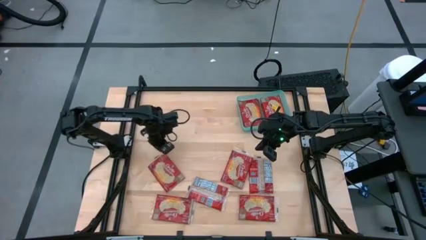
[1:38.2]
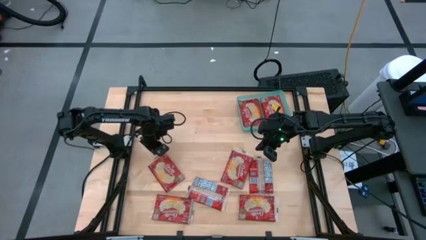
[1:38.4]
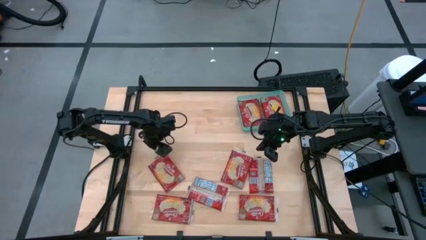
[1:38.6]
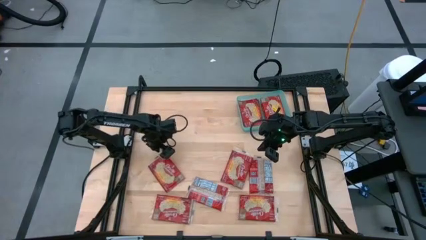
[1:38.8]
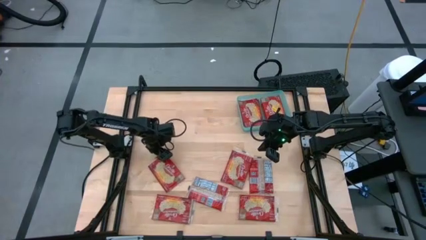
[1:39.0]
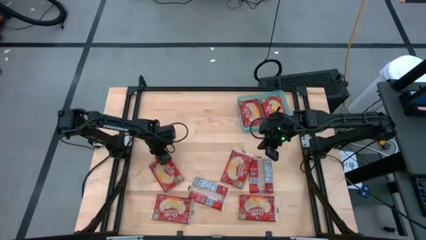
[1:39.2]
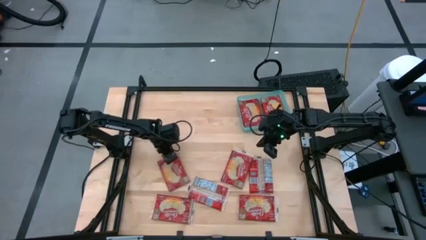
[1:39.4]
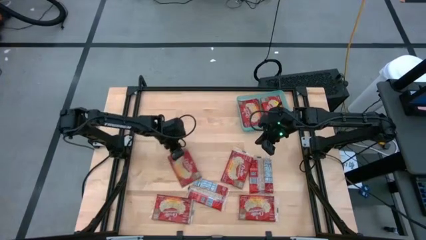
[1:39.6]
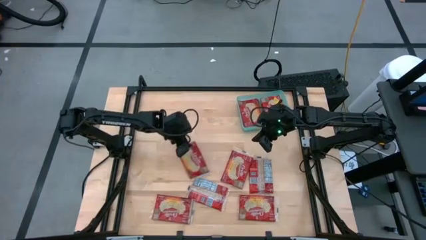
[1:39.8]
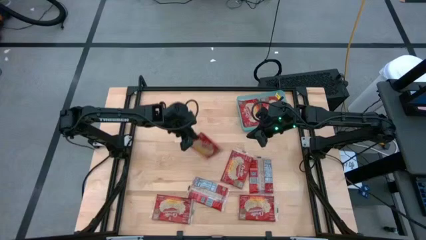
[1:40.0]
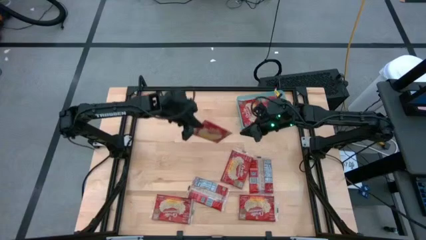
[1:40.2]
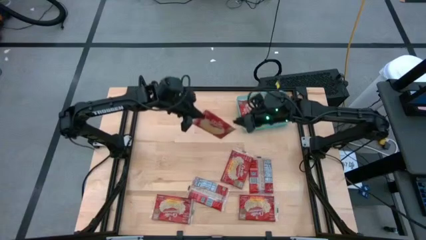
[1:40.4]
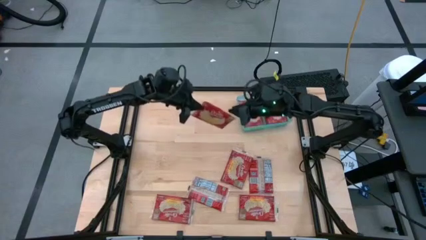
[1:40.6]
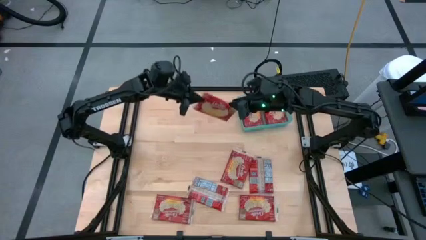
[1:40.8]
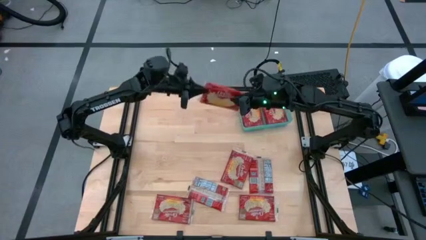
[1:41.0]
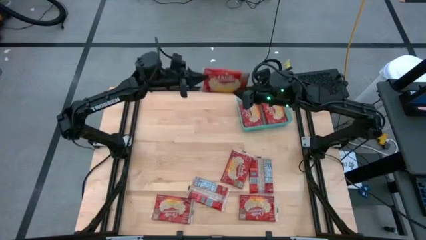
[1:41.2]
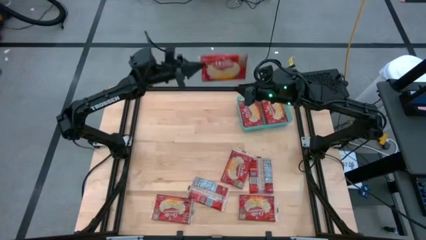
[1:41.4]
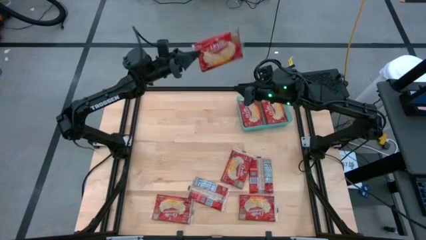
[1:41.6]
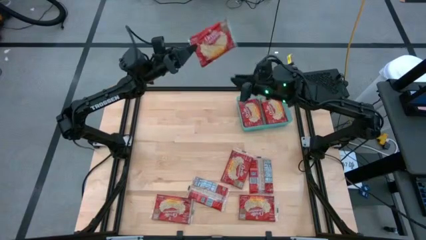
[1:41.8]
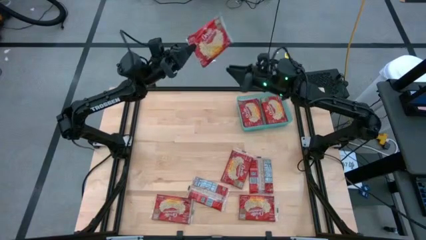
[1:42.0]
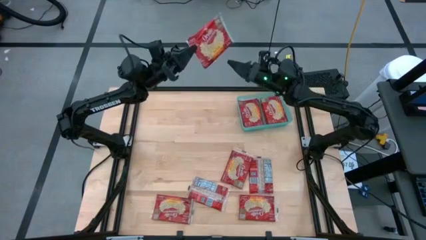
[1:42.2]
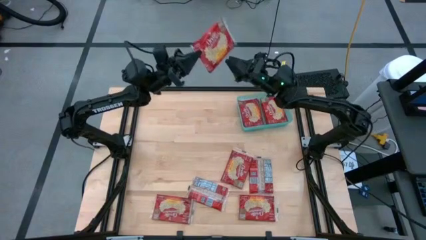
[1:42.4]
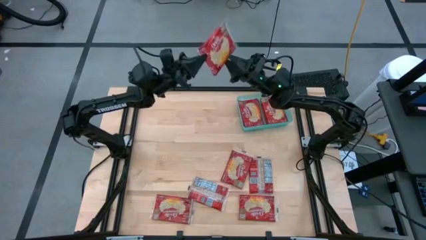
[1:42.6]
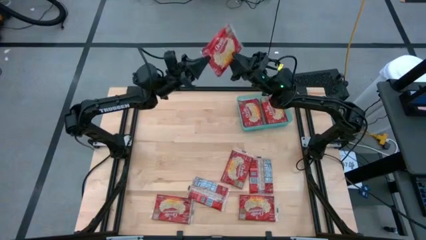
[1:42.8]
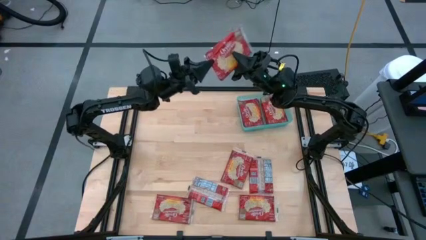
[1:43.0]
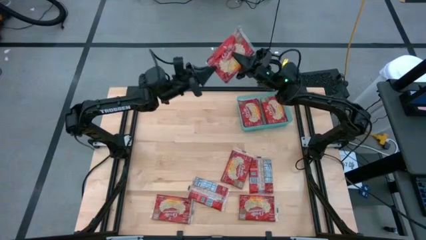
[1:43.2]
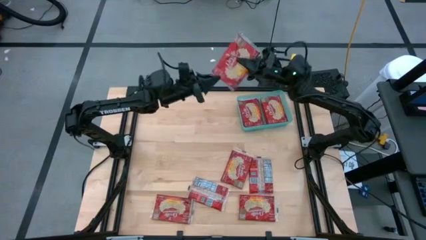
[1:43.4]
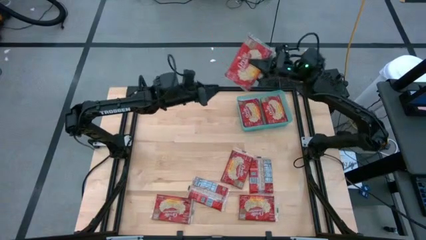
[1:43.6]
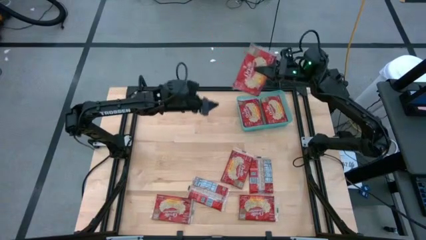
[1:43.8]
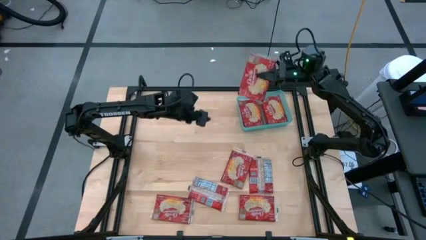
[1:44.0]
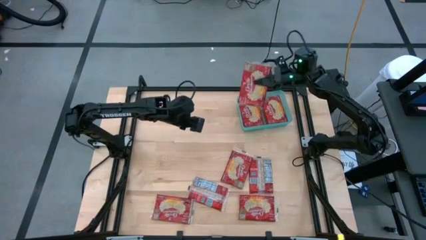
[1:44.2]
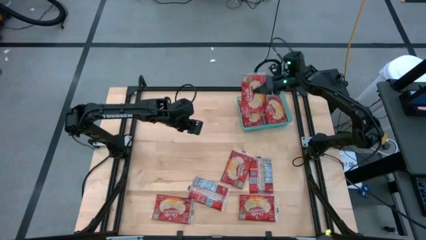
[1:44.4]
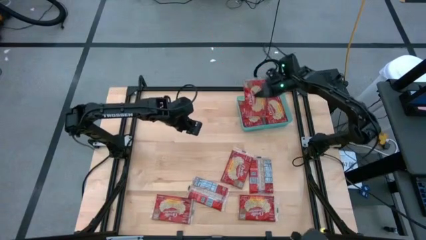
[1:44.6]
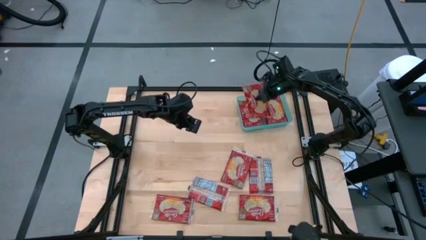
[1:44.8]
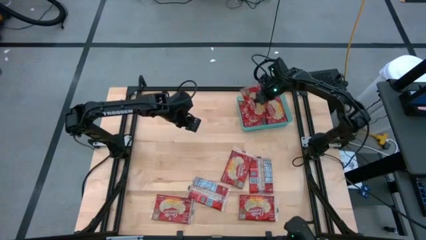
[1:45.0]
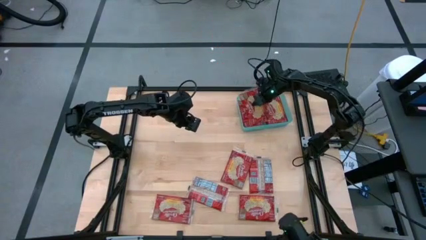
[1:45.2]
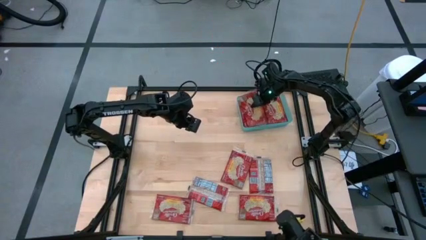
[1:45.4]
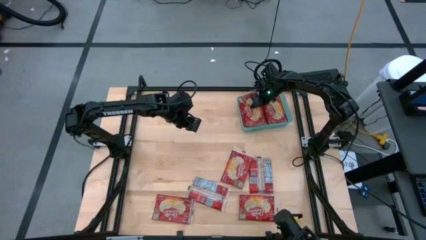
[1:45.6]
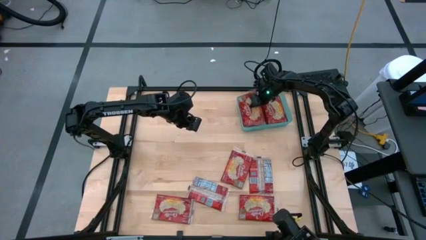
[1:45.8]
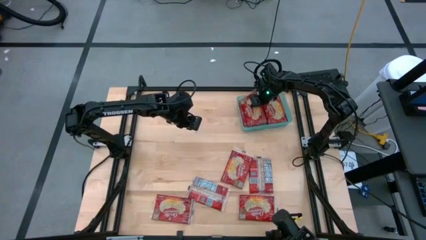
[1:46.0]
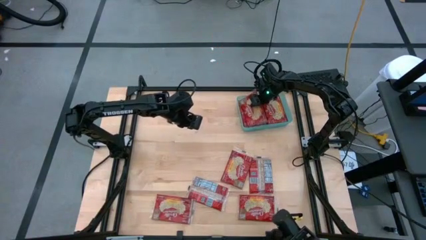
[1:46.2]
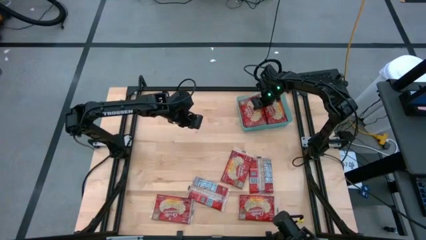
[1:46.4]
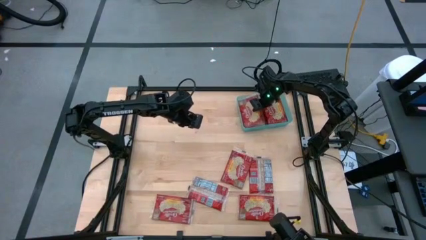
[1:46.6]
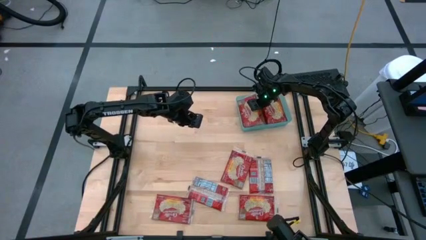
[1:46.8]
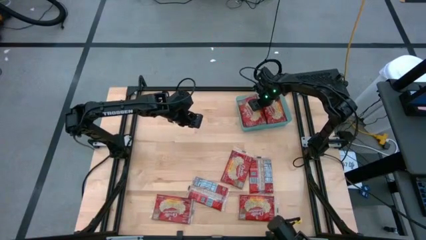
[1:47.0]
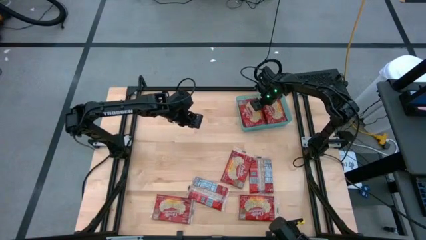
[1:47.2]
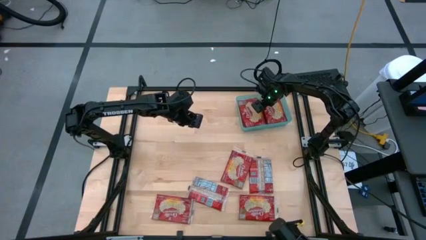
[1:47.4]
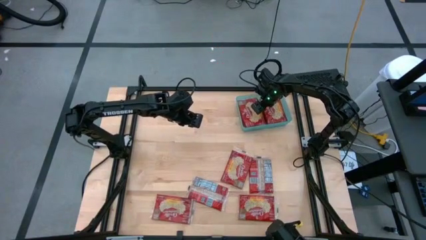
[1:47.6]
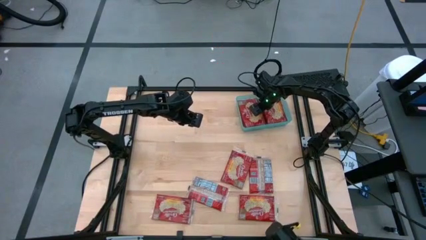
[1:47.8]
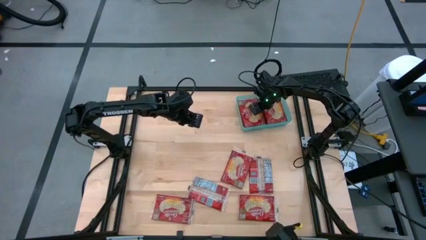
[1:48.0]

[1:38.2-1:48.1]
Task: Sort popcorn bags into baskets
Put the red popcorn bag into the light blue bin

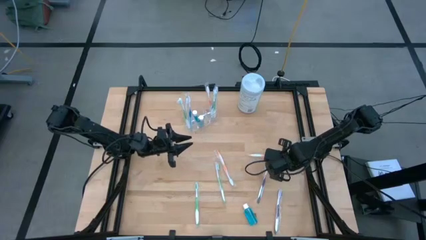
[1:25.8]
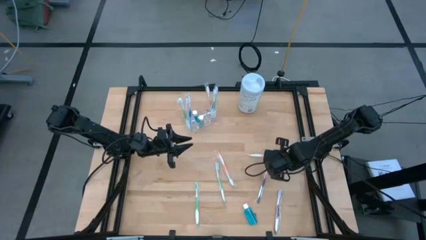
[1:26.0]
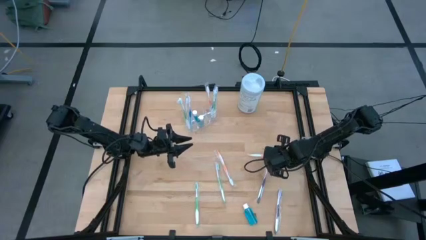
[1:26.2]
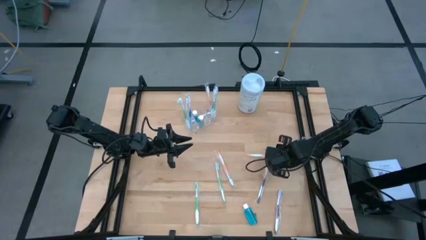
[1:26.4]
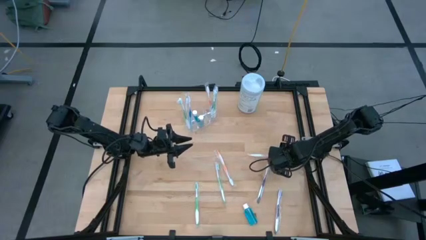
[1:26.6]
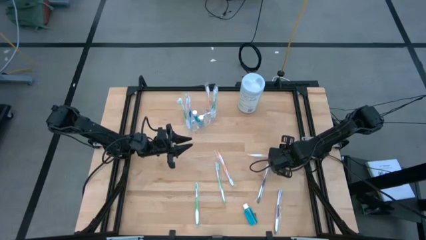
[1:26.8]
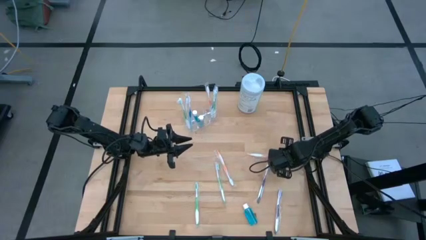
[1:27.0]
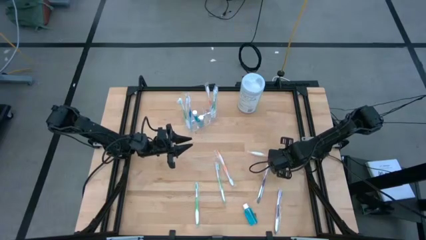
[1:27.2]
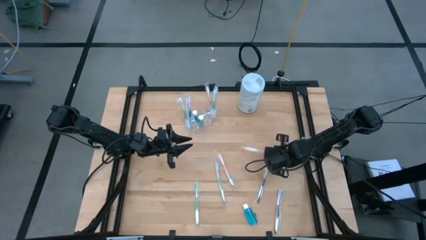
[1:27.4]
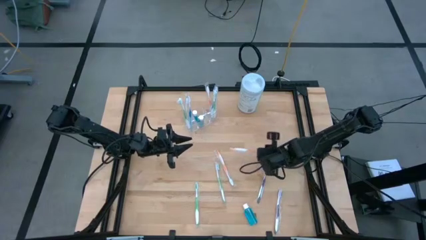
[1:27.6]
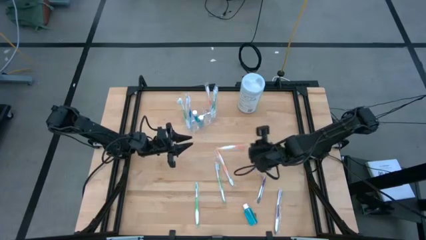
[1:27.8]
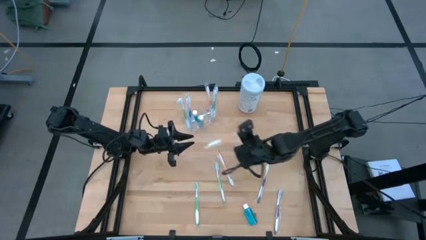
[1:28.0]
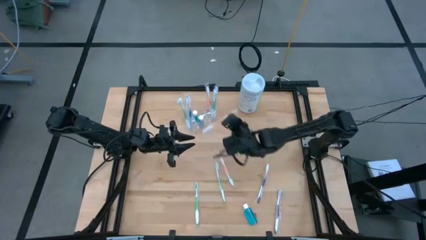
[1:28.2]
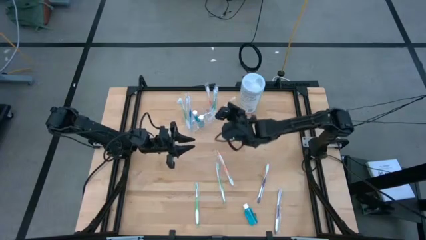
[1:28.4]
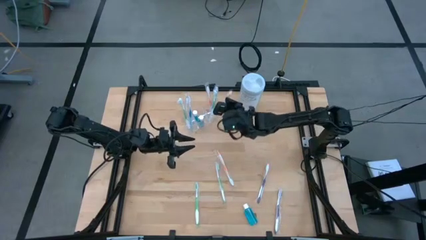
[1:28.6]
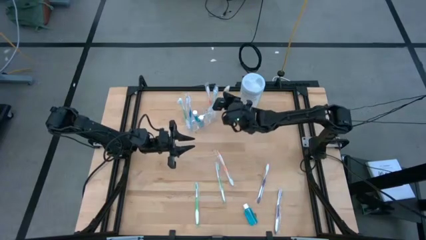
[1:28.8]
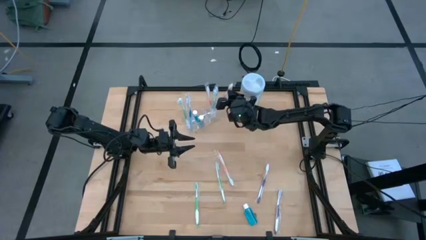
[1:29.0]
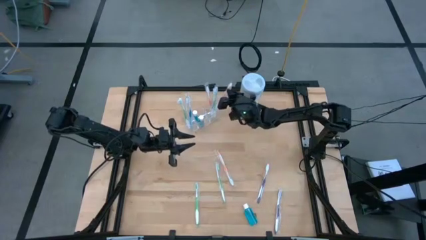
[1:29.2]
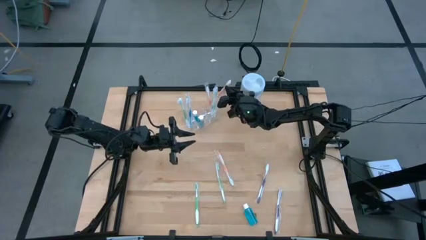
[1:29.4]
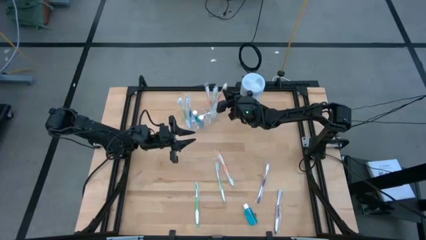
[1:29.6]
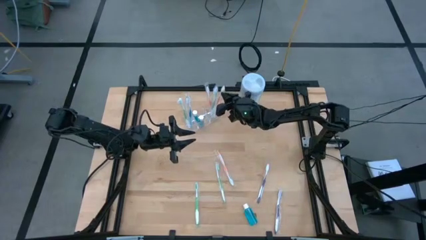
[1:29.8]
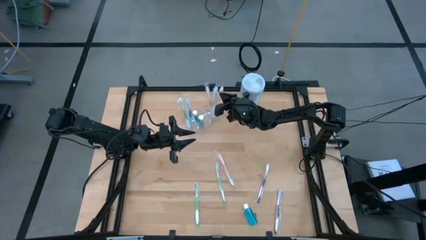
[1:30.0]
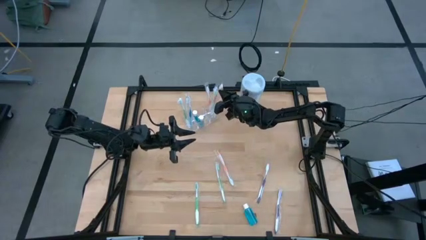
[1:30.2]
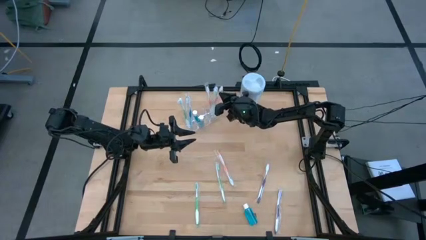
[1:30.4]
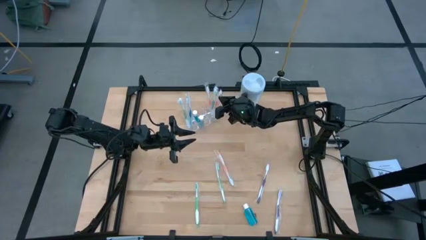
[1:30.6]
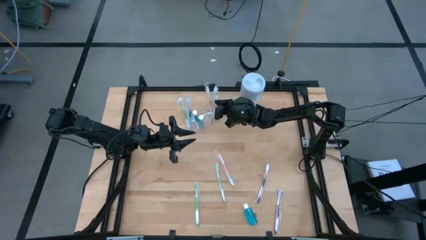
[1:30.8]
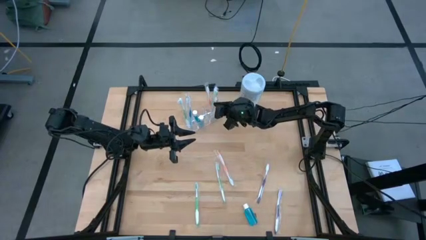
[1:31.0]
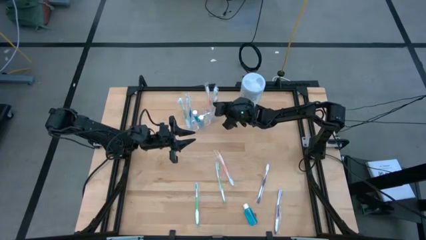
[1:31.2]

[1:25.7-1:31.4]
Task: Pick & Place toothbrushing station
Put the orange toothbrush into the transparent organizer
